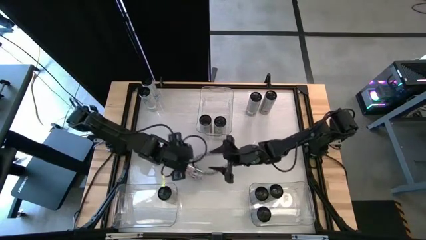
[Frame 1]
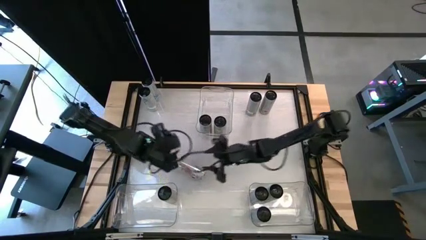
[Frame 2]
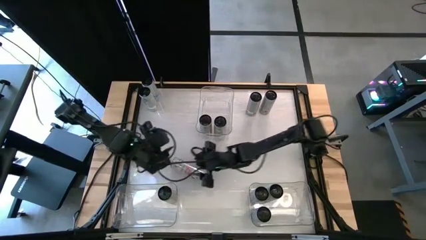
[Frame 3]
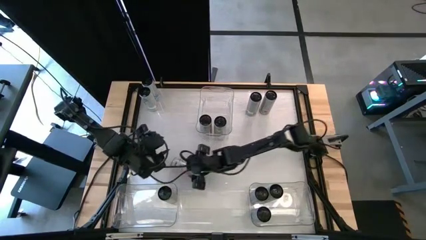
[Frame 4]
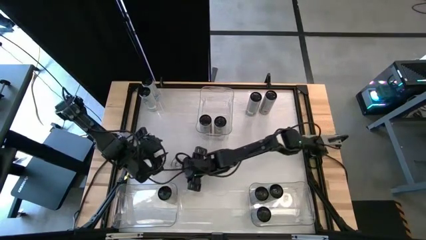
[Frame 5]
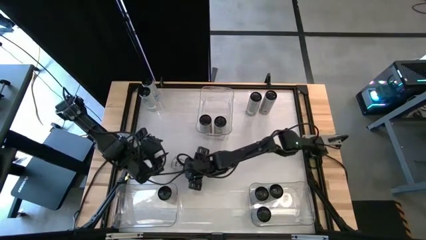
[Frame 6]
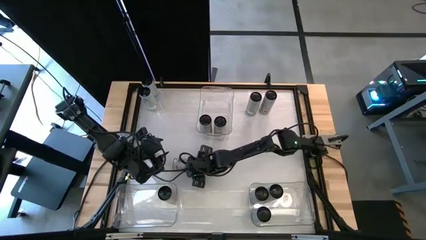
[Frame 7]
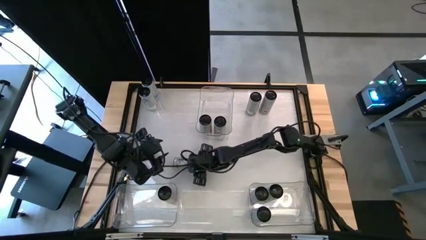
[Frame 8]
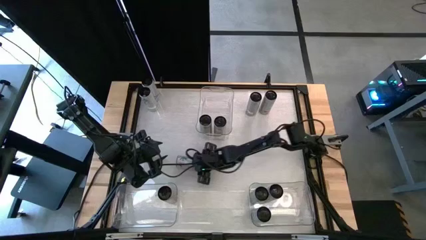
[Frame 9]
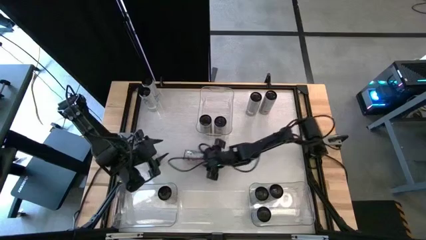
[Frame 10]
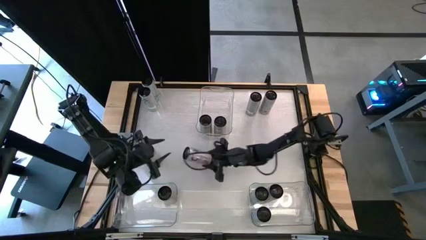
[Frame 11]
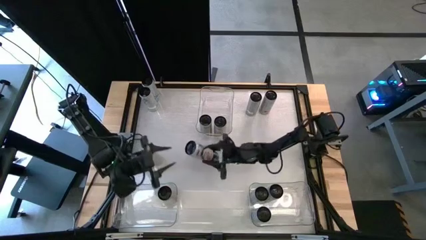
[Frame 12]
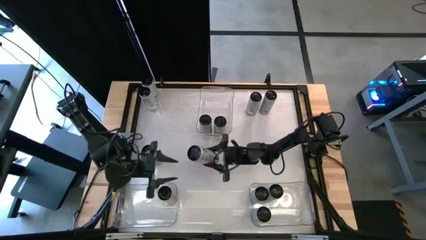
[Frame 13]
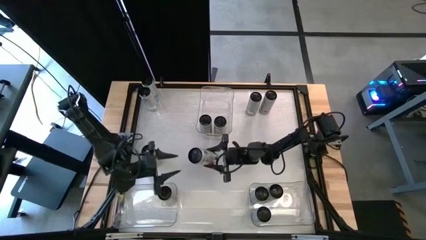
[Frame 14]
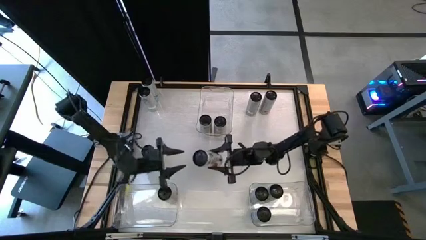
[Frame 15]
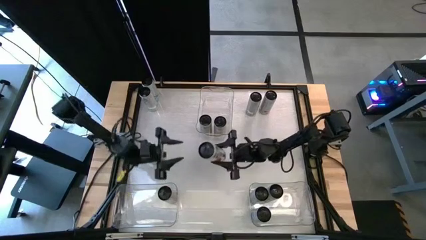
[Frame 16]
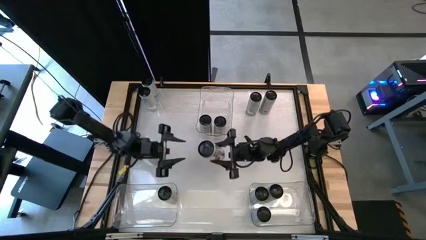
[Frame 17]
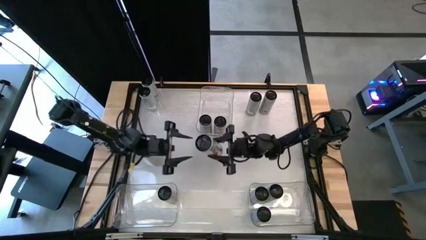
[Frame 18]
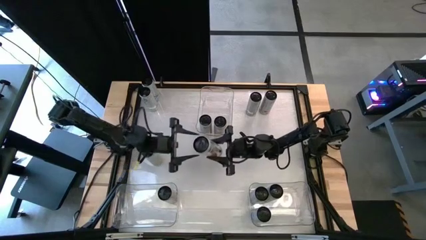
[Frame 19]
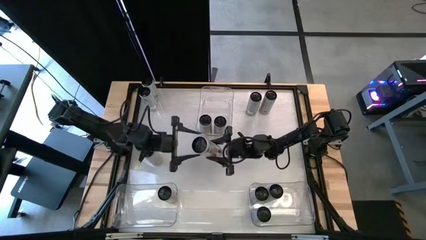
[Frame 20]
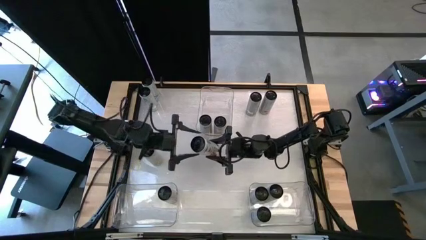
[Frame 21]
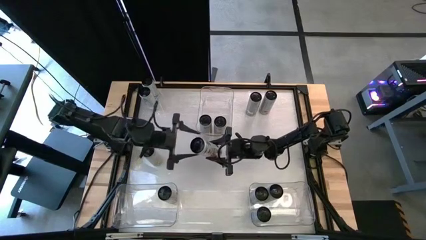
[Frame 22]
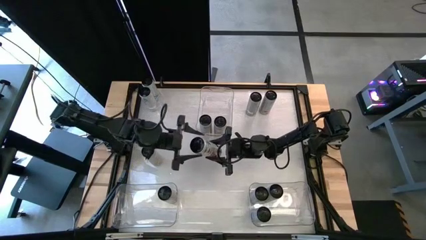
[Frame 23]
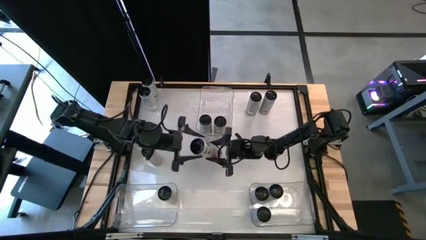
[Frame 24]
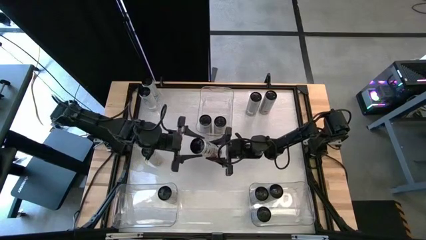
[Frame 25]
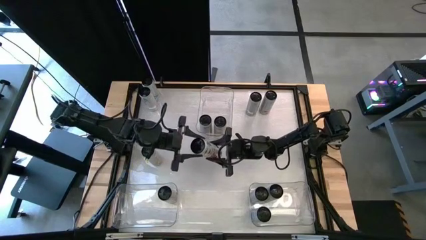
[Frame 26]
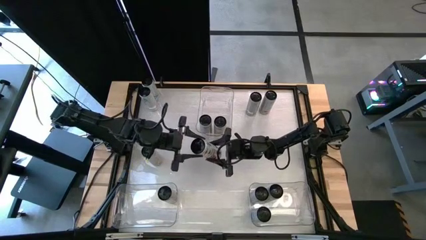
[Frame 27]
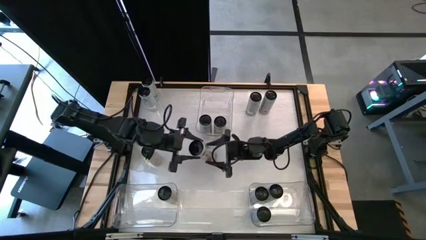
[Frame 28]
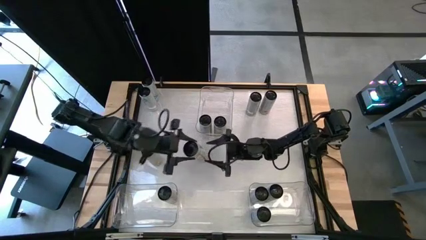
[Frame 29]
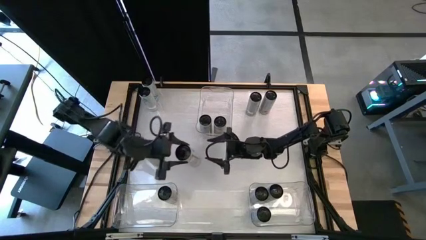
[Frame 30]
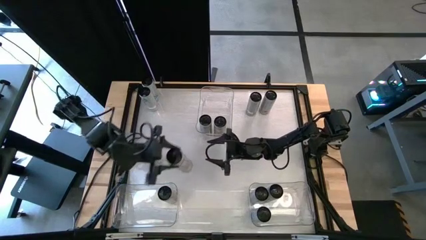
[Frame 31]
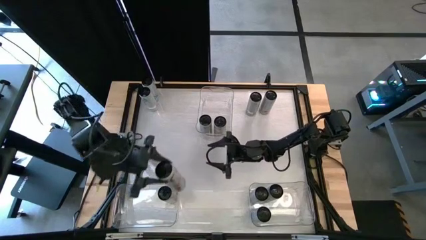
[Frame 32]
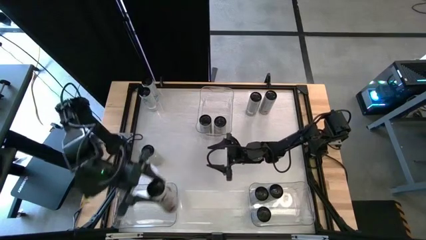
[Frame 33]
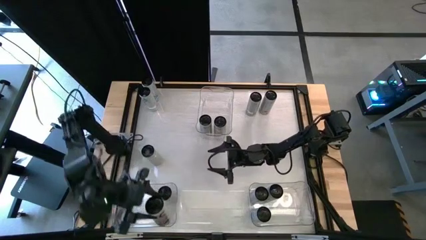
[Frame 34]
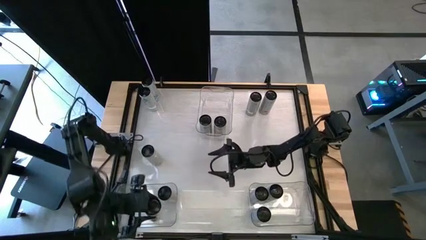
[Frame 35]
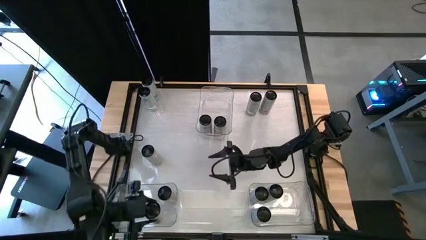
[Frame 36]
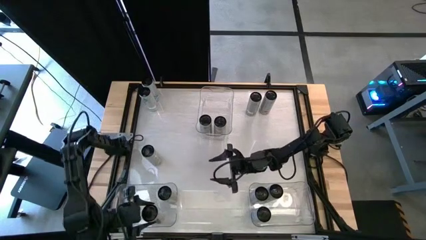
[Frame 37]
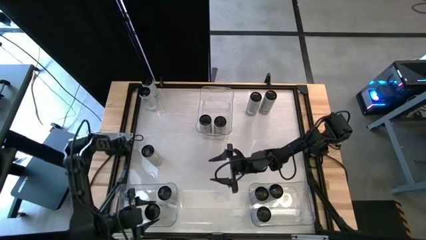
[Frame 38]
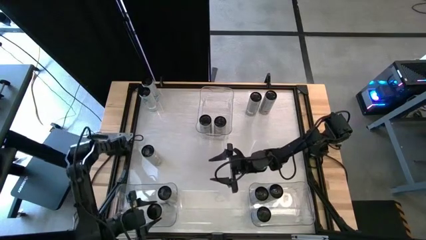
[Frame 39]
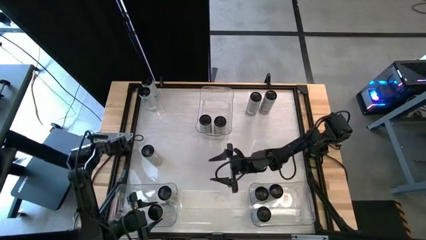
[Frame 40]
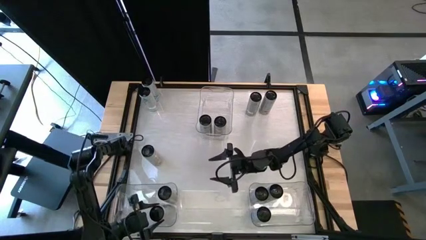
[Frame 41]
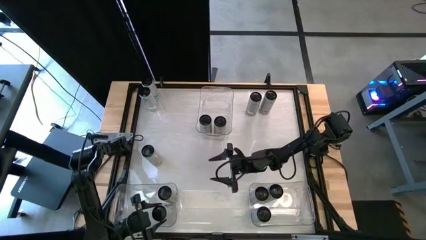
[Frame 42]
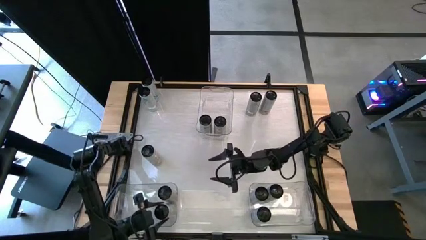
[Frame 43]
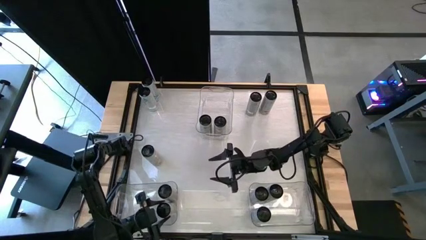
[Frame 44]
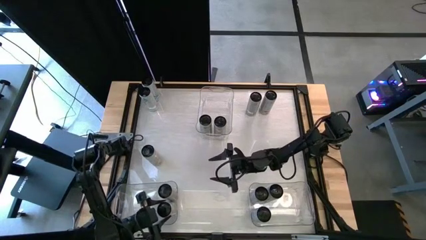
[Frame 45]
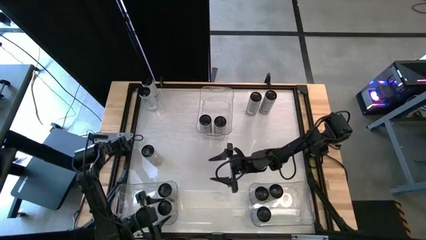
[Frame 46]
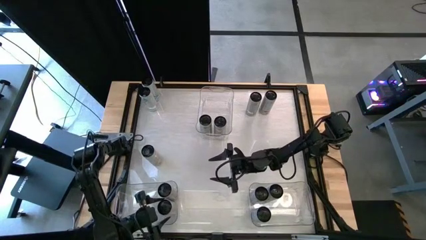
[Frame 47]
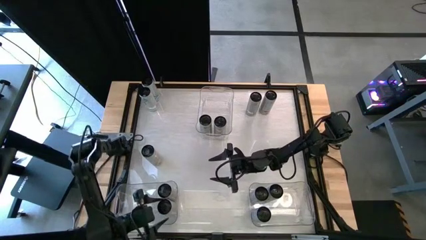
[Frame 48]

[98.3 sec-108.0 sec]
Task: Sort soda cans
Put the bottom white pink soda can into the bottom left transparent bin
